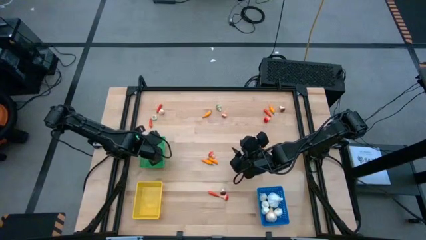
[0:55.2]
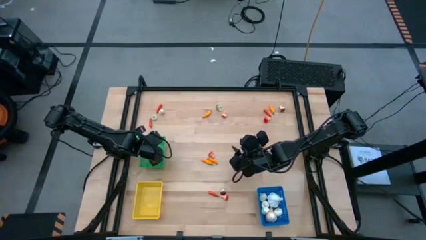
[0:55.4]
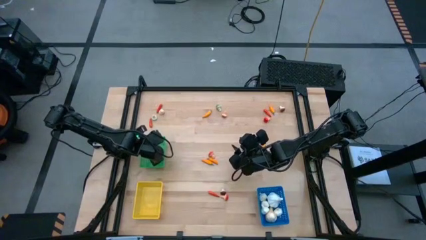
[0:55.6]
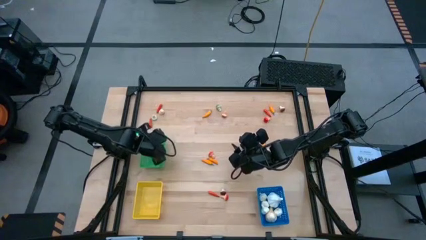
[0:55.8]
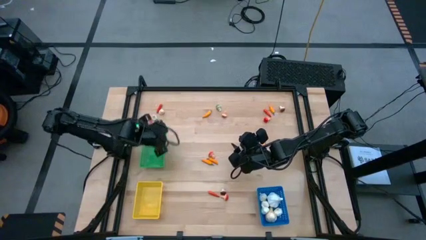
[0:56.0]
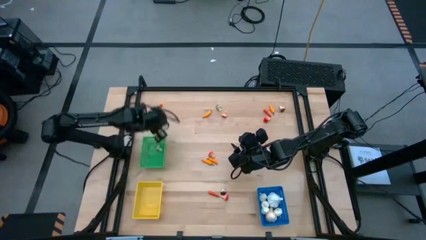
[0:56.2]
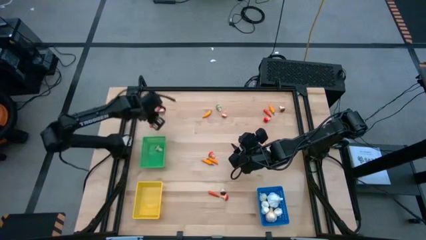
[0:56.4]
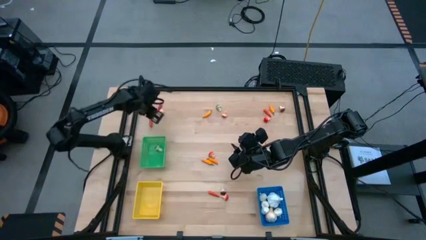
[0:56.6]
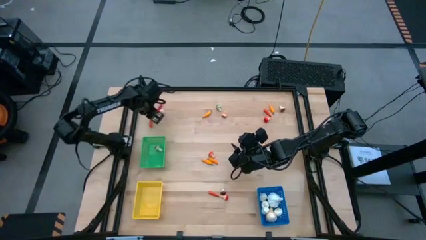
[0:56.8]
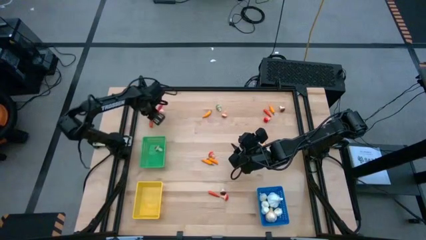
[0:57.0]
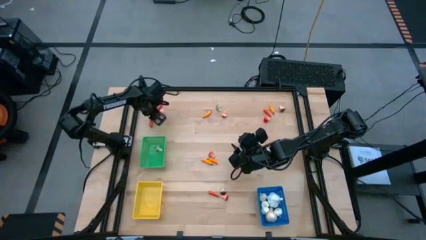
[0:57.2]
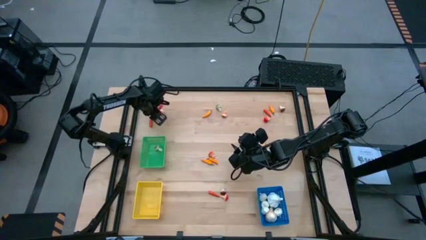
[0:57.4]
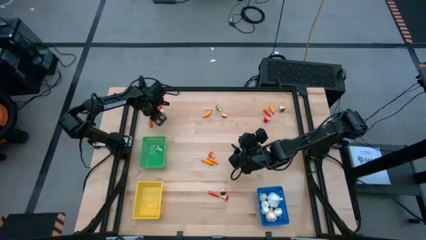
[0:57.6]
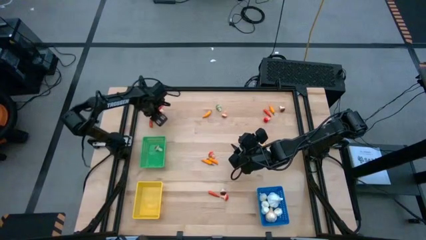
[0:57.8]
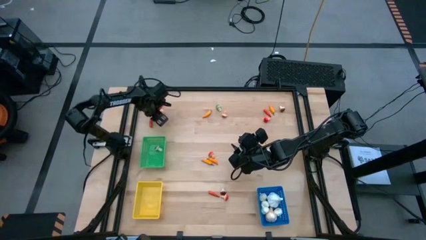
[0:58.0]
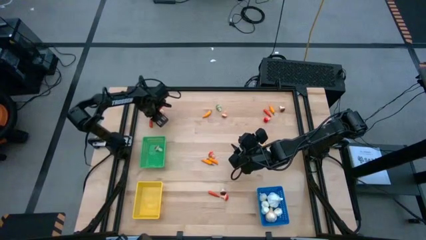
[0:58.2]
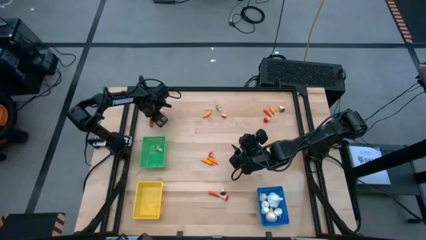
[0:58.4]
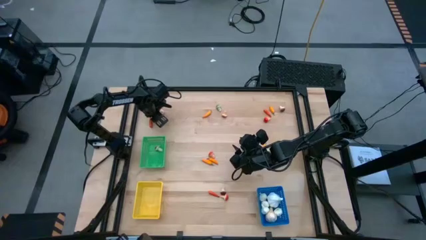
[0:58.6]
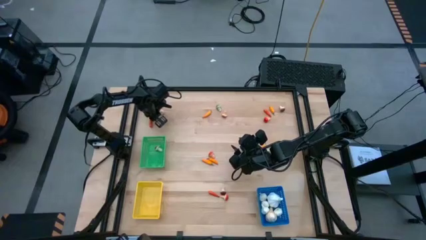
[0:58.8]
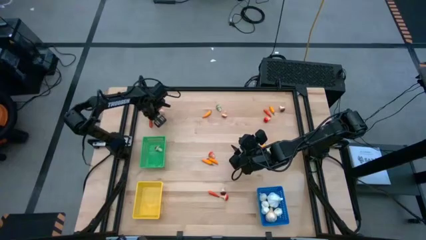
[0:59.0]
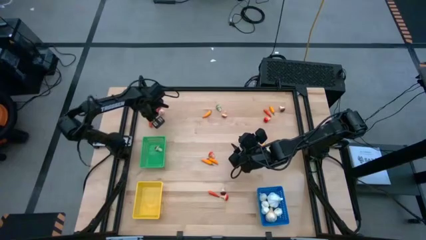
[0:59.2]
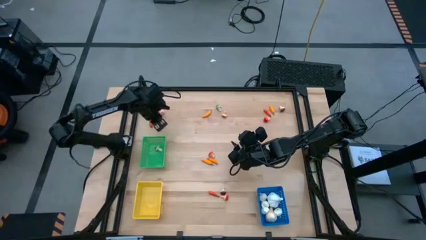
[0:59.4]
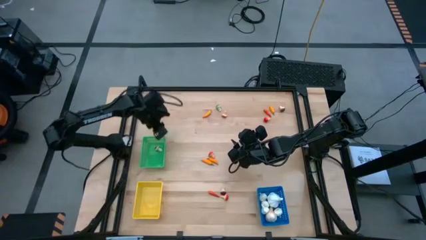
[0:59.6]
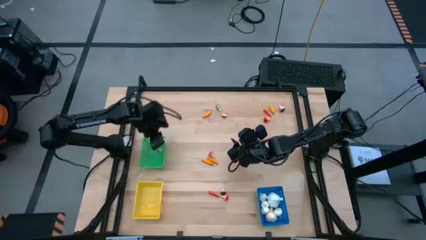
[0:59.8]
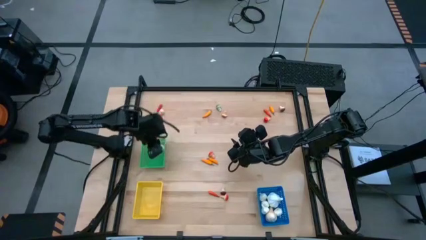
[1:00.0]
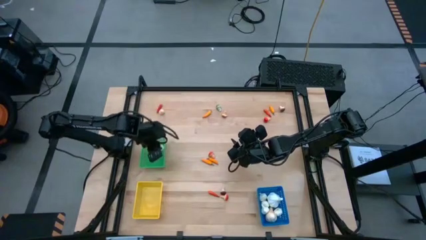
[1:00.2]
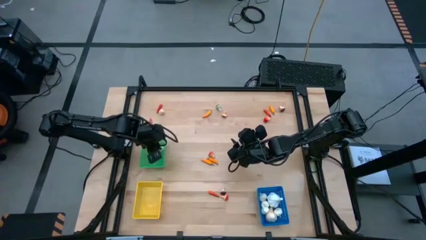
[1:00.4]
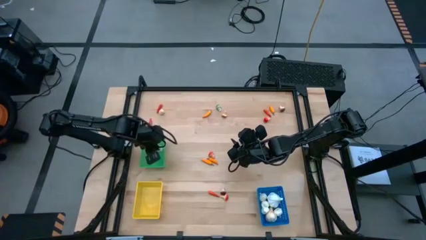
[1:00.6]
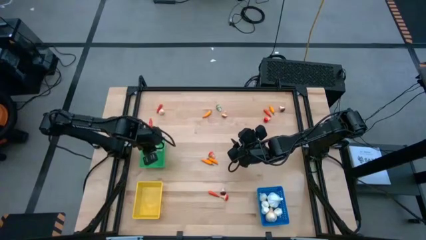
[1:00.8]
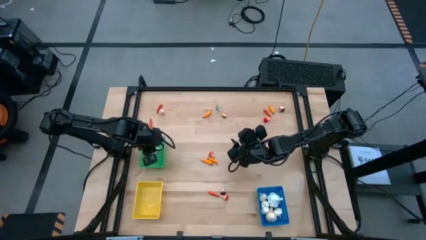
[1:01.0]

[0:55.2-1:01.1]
Task: Sort produce into baskets
Put the green mushroom into the green bin

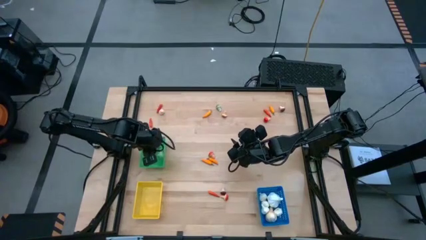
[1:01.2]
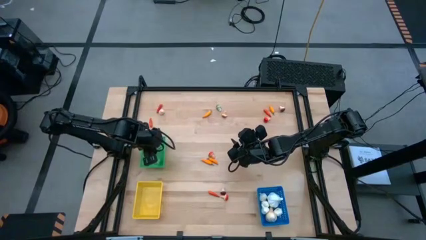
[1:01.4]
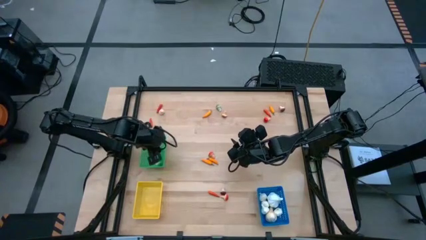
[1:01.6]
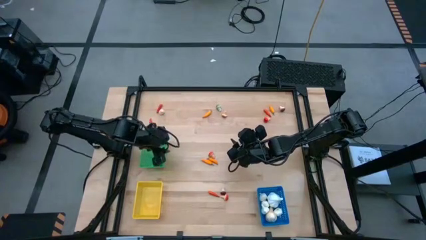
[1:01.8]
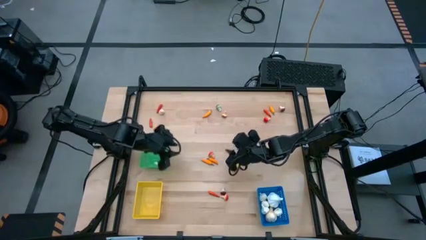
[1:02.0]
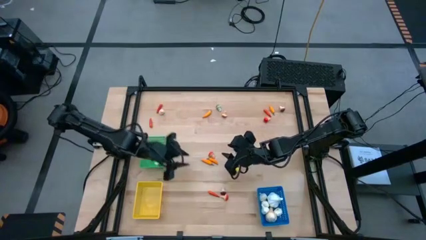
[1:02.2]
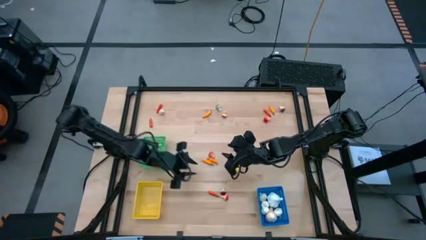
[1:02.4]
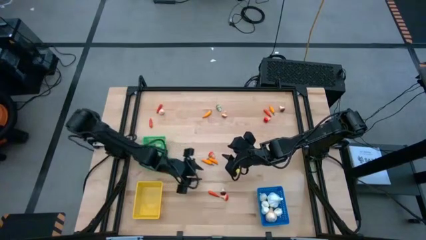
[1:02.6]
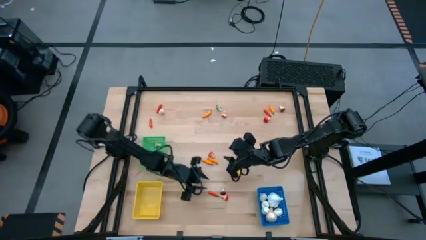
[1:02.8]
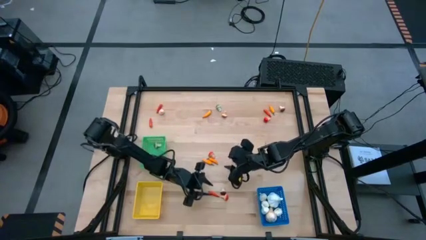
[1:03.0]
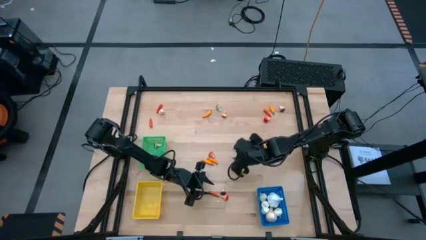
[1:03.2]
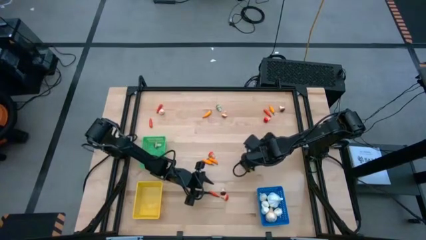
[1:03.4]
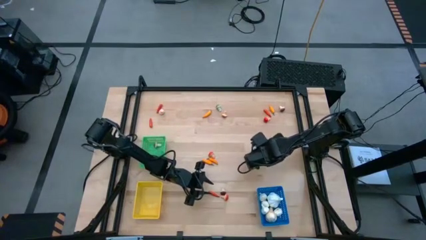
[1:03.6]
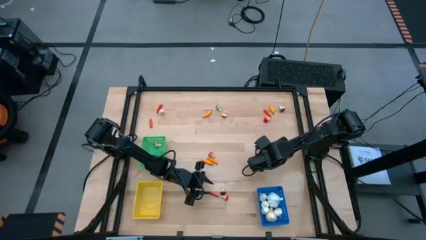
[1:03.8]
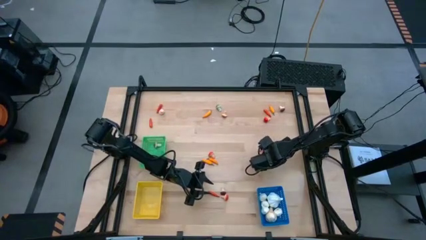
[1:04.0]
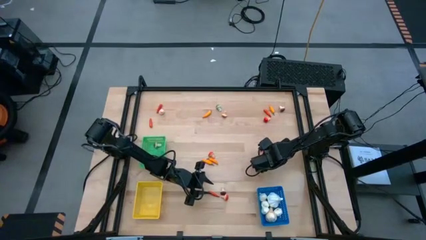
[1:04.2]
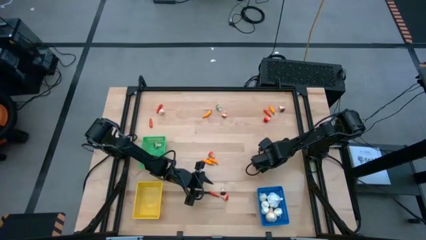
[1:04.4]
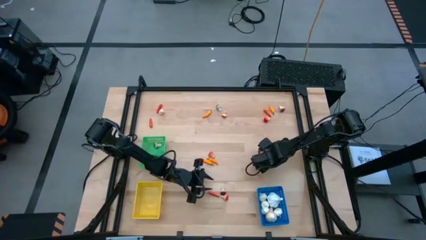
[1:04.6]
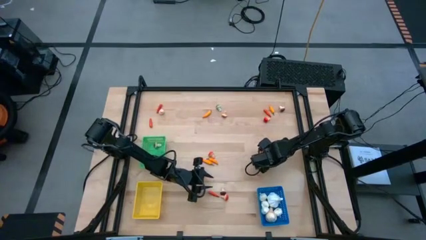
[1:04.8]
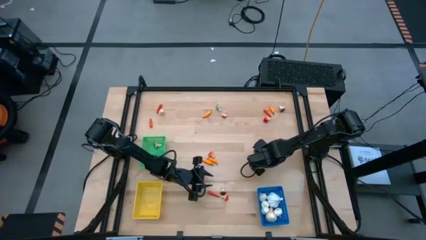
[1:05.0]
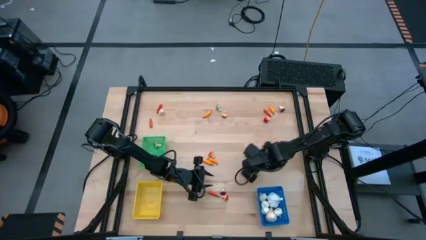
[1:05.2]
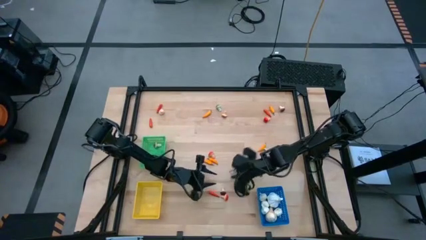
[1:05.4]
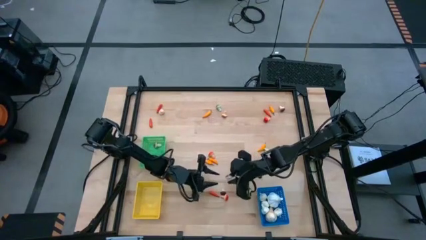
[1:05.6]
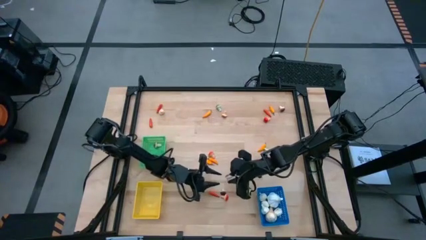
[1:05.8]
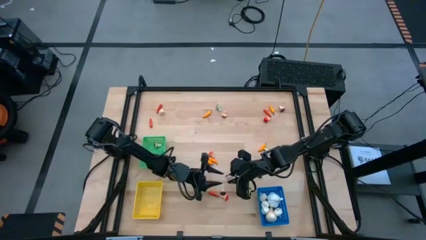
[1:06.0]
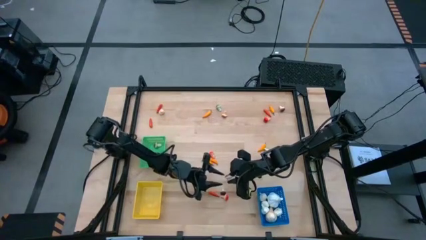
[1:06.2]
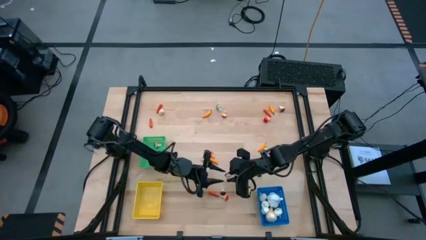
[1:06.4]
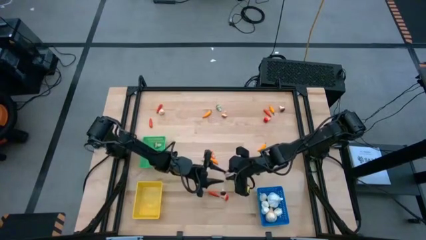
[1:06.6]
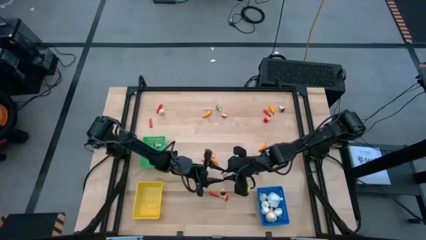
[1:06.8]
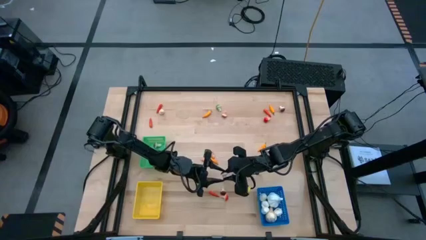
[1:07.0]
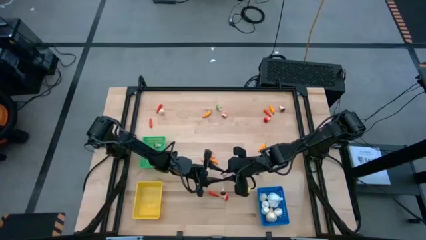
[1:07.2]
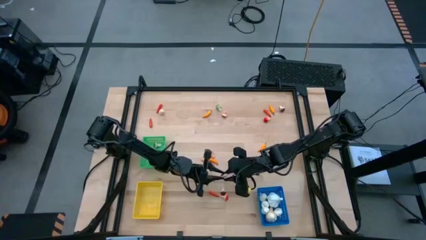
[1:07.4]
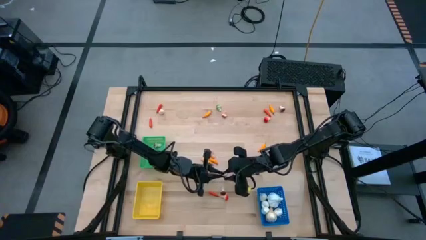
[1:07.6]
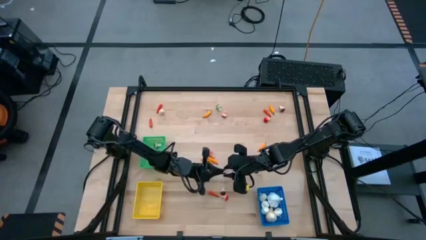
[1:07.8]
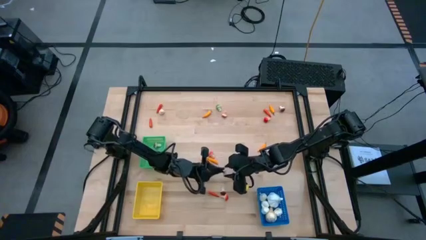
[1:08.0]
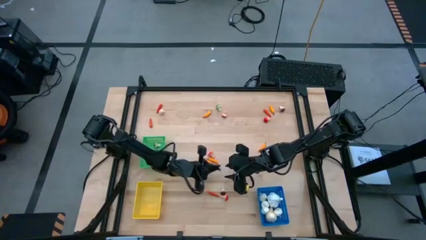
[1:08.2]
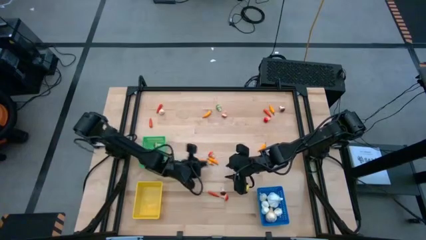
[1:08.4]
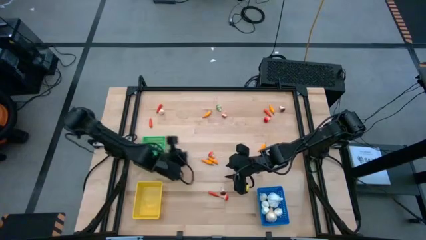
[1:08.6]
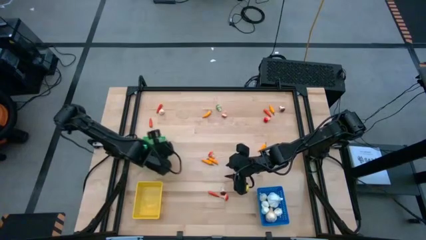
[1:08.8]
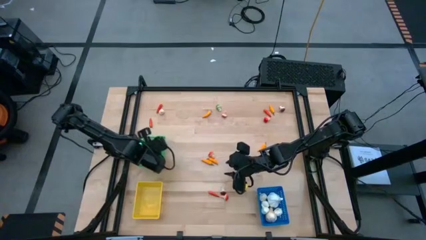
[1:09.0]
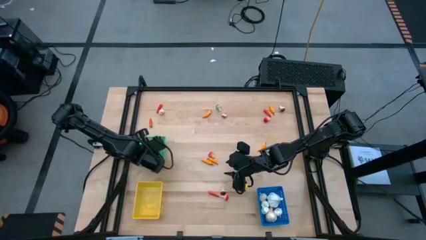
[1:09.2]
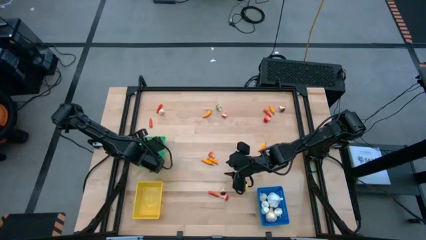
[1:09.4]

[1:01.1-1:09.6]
Put the brown mushroom into the green bin

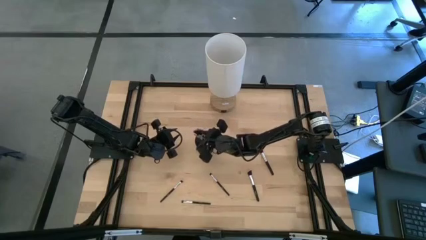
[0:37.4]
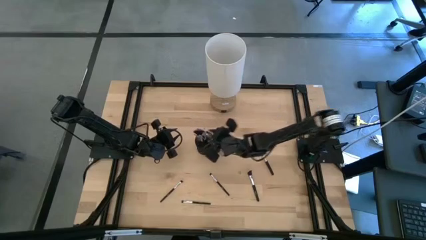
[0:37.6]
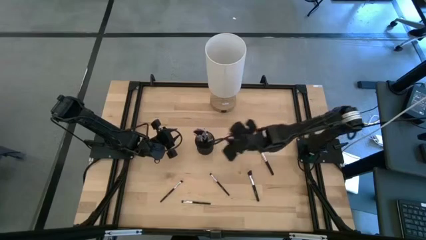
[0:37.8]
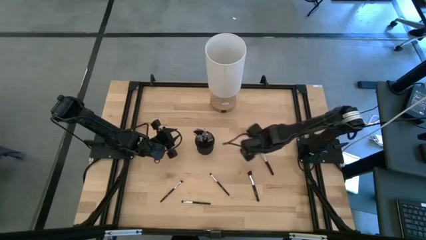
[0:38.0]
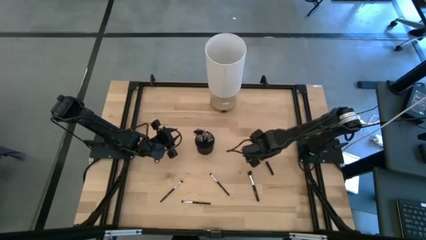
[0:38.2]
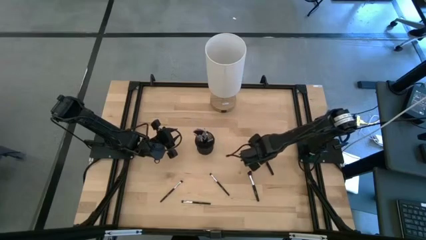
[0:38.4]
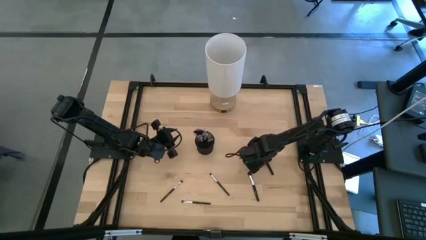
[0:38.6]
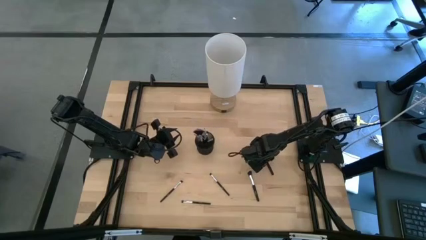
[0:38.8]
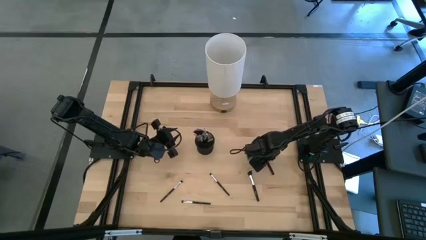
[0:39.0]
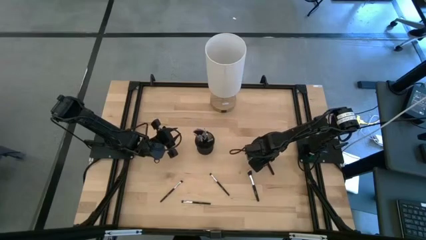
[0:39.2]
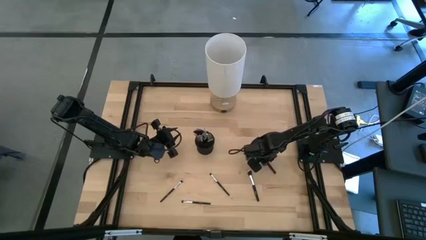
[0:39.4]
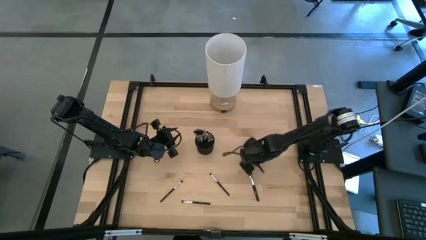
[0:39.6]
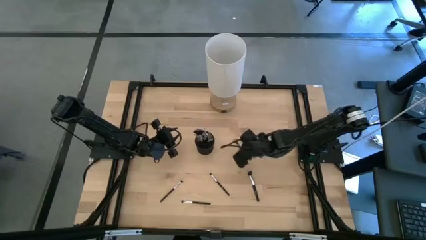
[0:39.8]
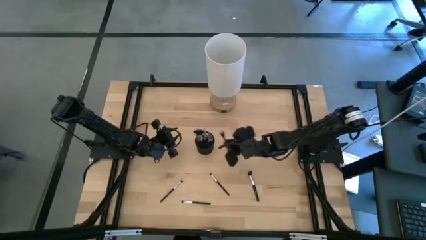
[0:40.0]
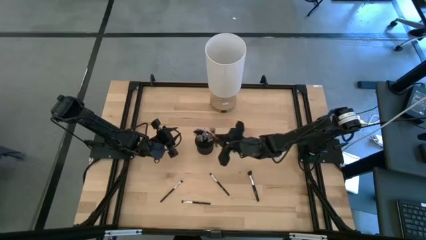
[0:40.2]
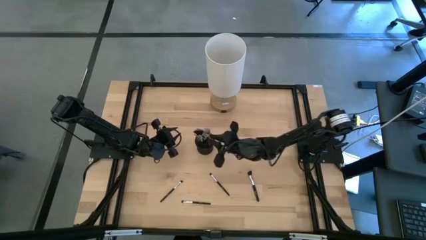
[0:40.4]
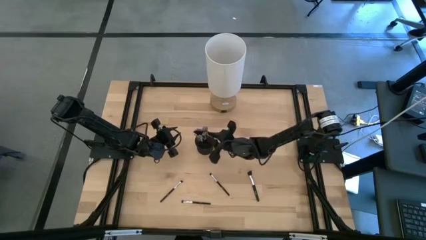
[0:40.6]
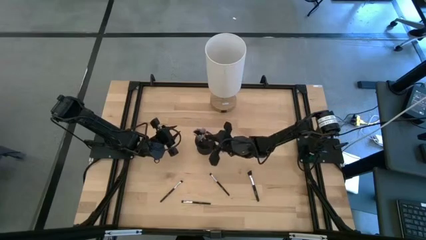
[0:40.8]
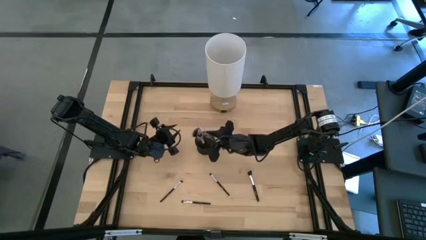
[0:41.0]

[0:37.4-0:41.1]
Task: Put items in baskets/containers
Put the blush brush into the holder
